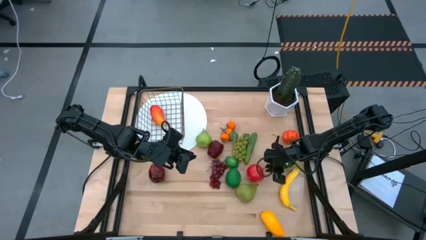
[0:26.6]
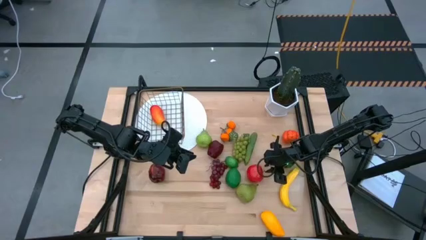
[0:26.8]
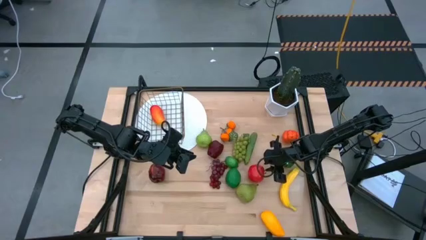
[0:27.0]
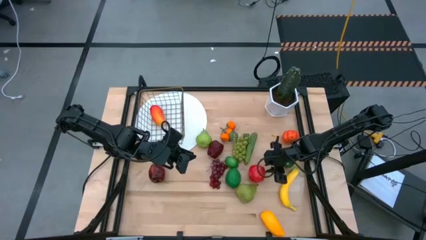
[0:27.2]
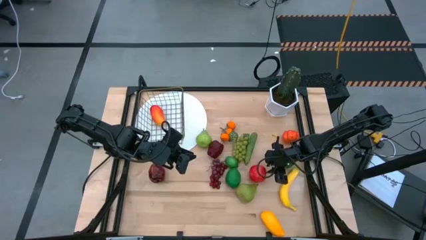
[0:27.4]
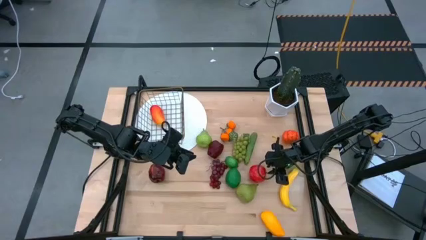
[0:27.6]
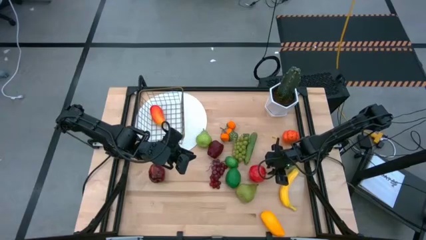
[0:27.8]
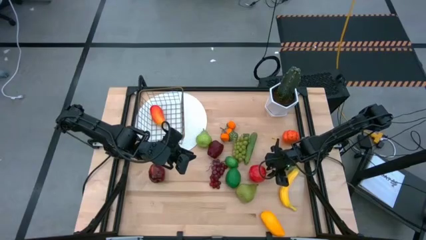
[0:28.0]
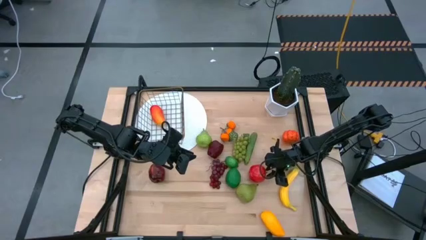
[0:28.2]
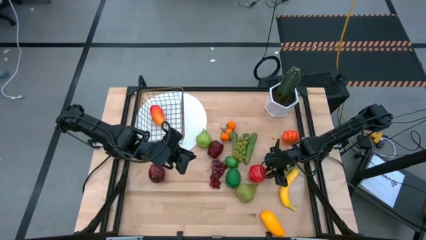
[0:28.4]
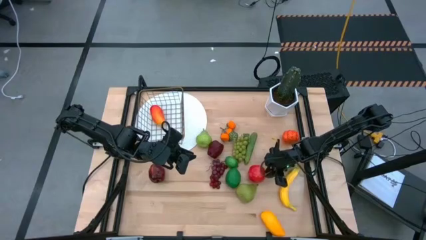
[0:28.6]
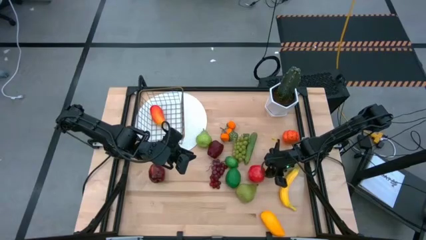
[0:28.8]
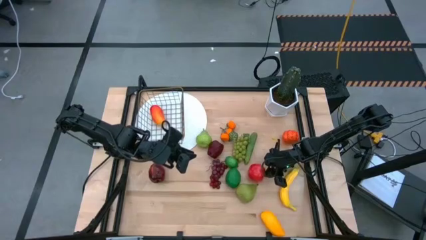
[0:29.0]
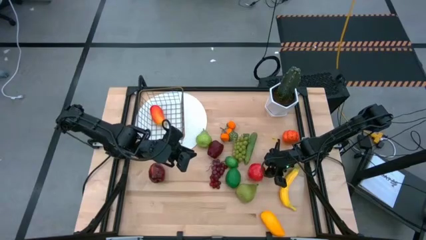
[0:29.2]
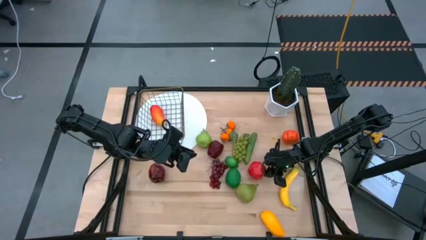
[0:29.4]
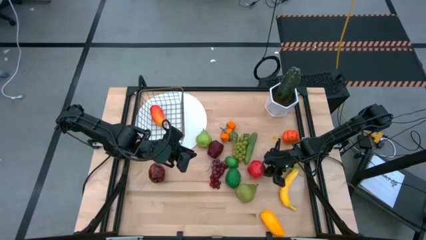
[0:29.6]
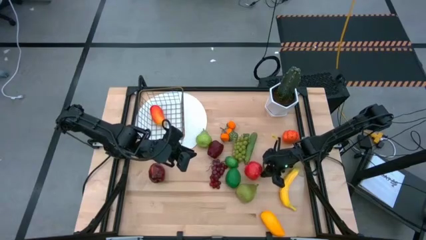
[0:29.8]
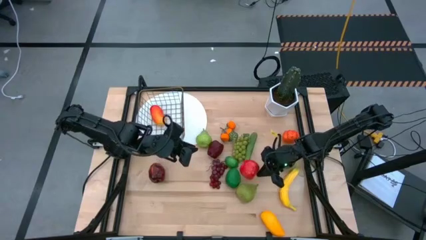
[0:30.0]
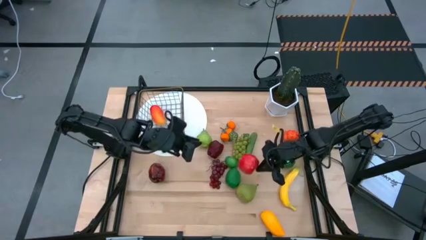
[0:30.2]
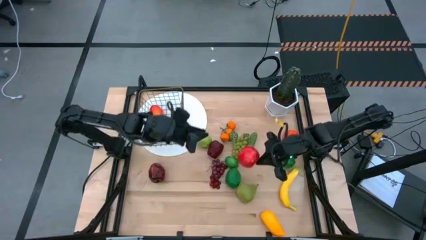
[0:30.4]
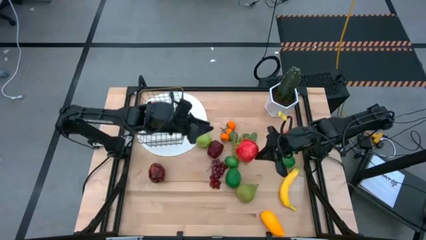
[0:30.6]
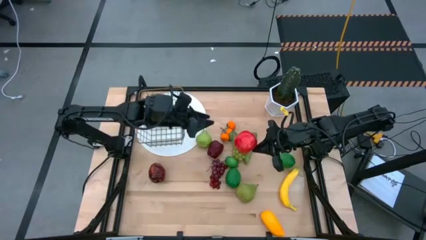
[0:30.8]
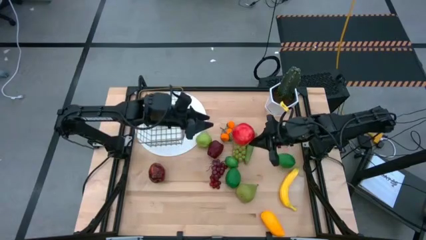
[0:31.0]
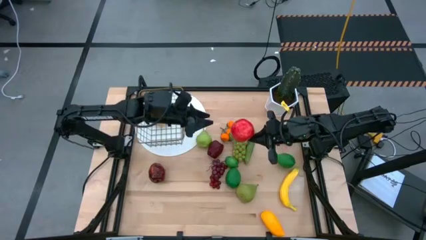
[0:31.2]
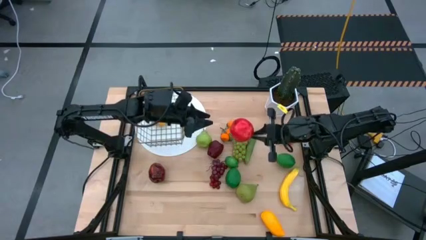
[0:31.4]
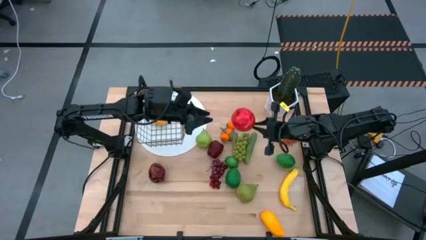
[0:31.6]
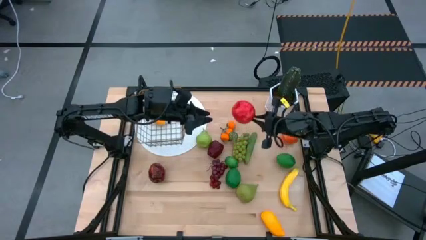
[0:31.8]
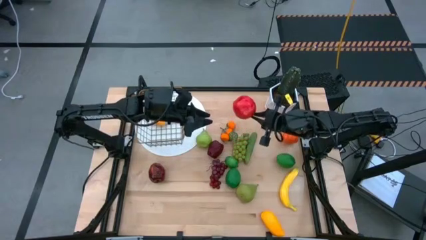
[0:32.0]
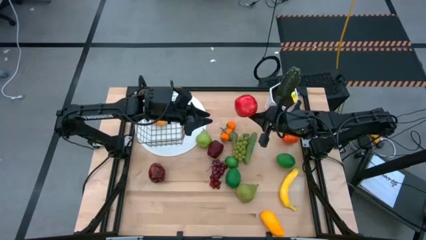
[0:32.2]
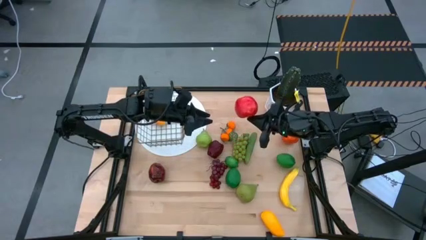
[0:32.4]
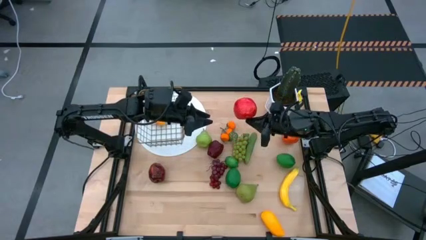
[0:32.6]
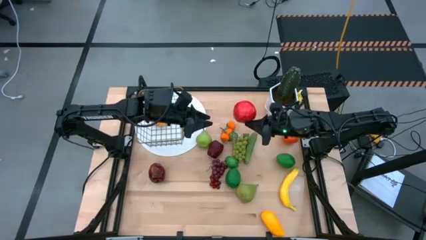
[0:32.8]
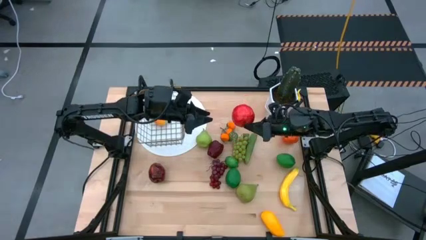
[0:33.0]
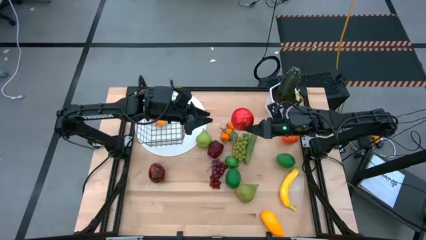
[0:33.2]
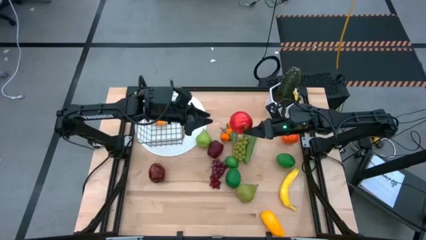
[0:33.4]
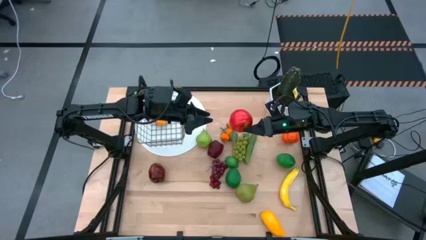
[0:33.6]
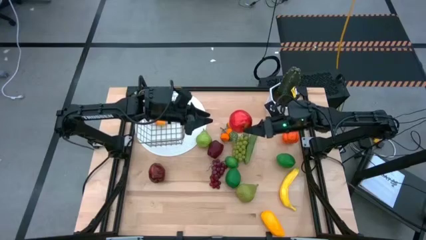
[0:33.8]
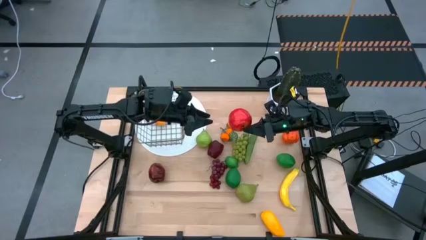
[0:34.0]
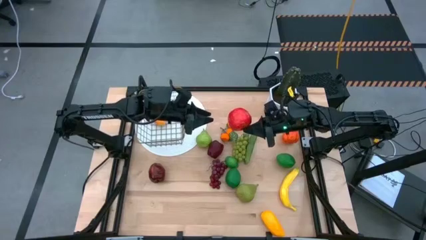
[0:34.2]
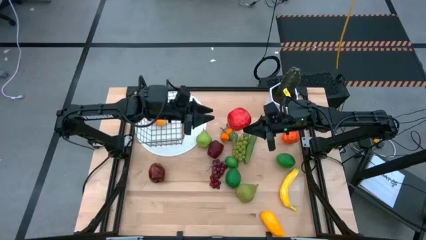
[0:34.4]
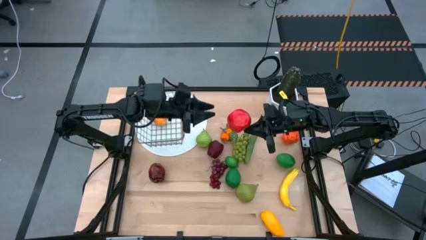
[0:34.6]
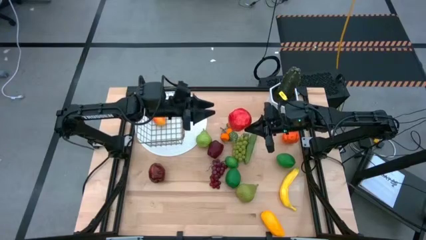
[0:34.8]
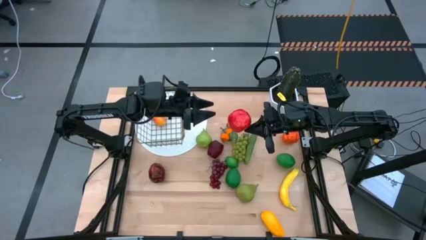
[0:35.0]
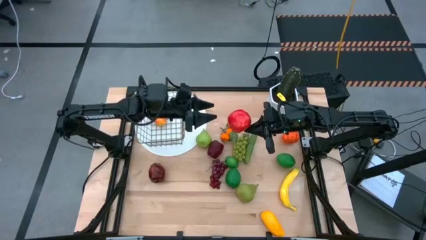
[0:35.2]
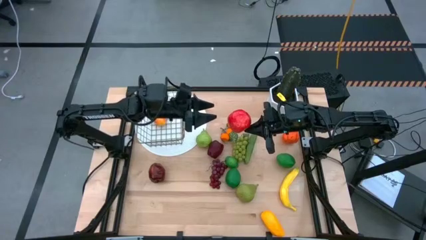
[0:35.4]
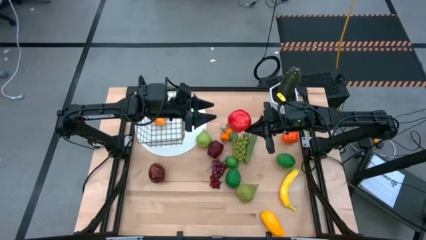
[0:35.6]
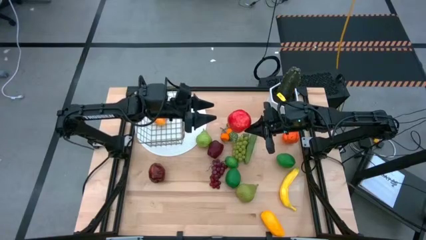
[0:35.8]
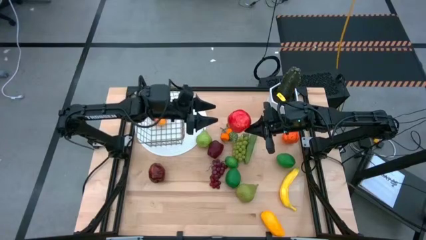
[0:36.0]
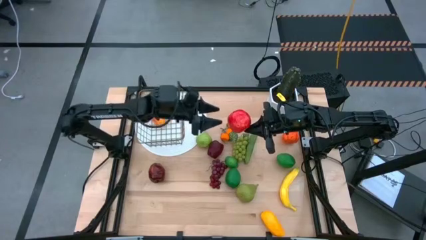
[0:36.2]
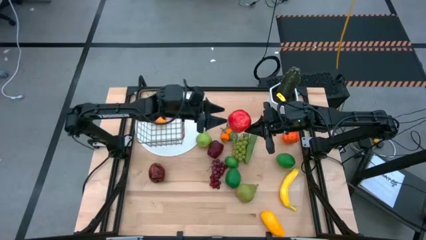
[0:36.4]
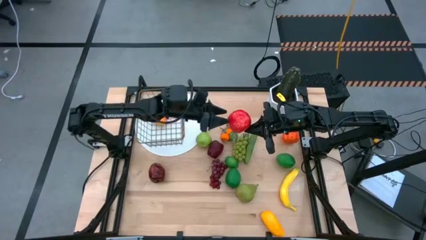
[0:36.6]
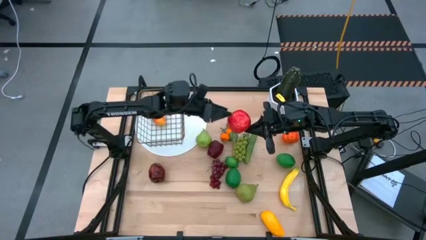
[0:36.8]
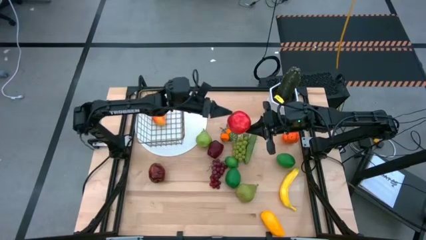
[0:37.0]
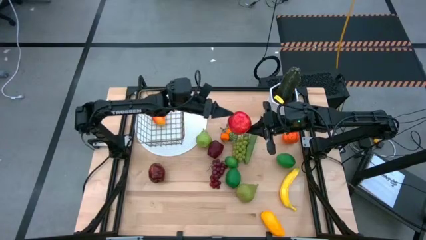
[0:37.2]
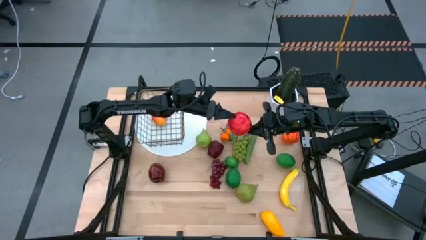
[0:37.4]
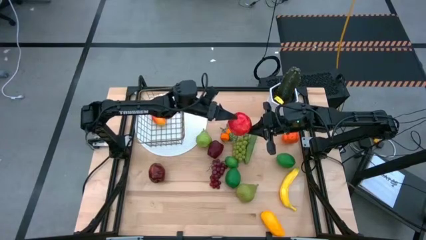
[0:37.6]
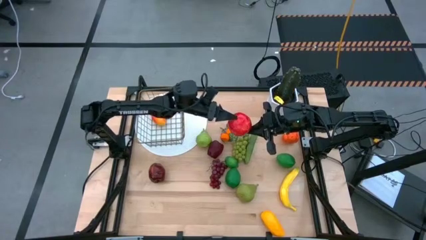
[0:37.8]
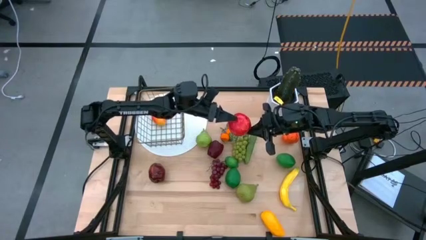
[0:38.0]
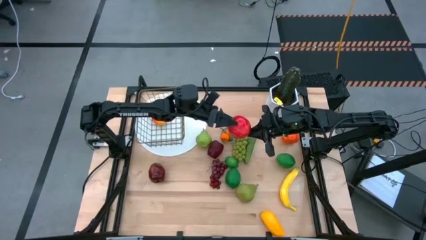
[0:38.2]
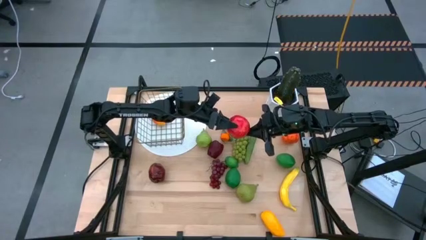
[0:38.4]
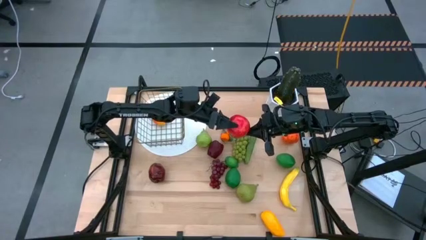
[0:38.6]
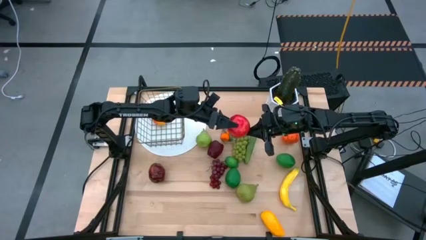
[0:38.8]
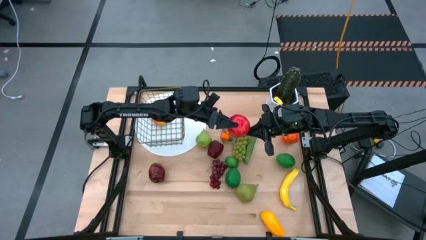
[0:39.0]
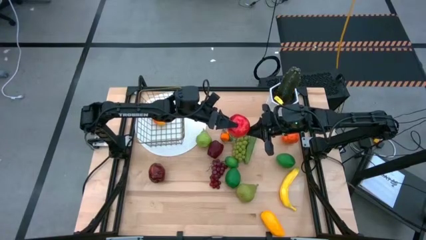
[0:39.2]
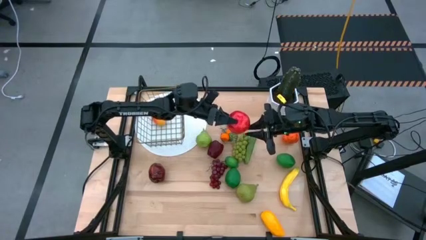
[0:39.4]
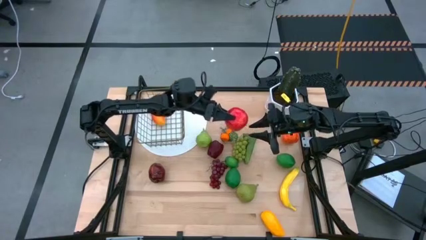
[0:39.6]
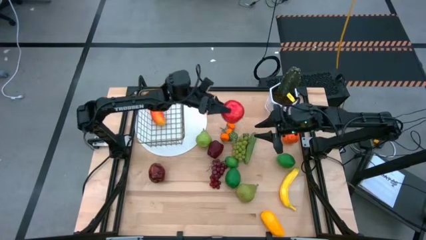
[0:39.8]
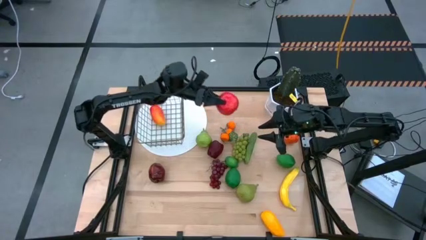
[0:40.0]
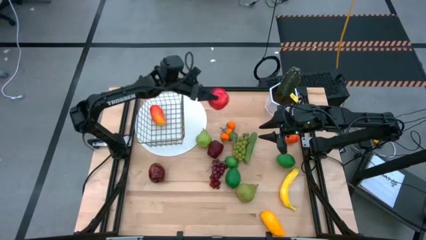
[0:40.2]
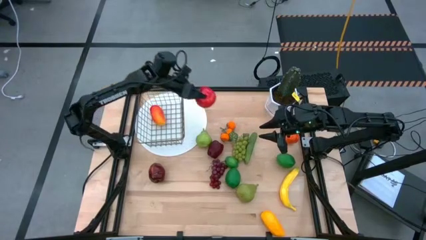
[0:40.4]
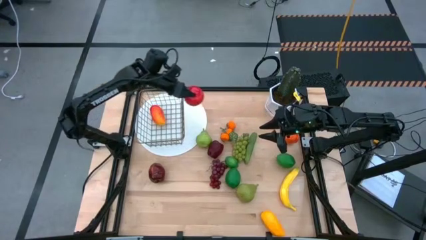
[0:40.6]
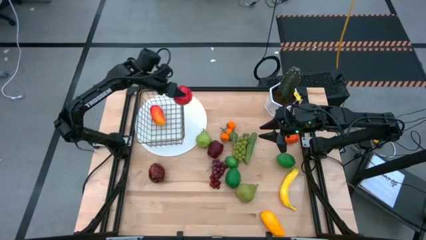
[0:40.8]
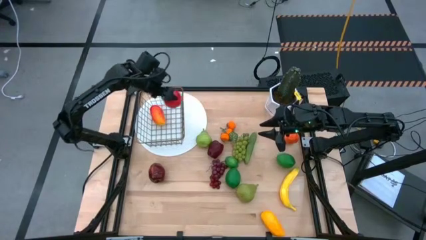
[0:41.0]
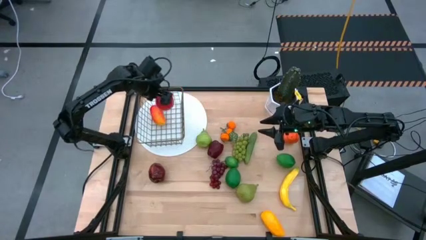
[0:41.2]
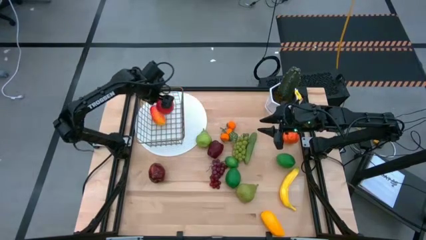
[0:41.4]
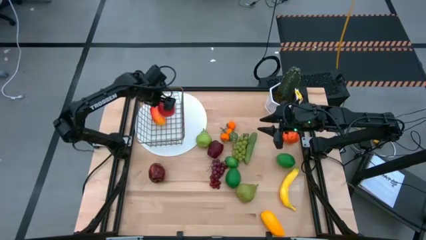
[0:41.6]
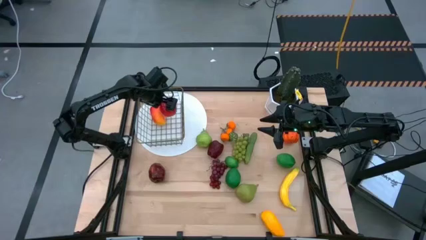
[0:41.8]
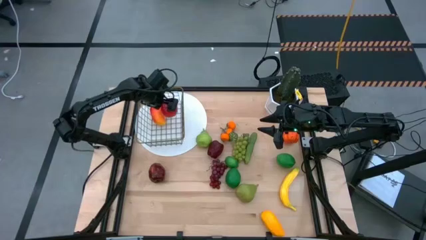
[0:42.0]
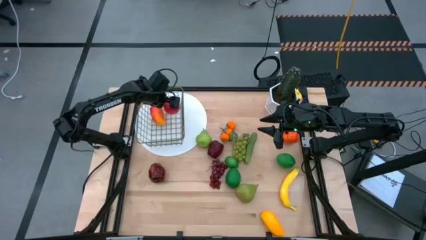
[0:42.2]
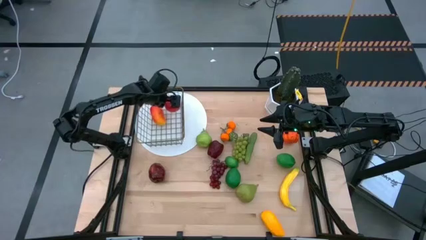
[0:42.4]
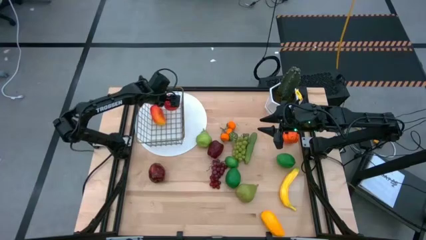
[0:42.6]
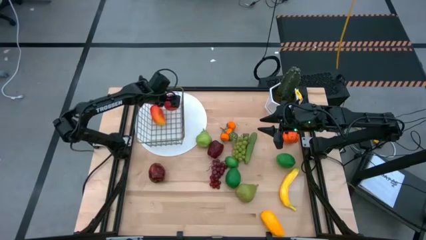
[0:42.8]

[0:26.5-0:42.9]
Task: Build produce basket
Put the red apple into the wire basket
